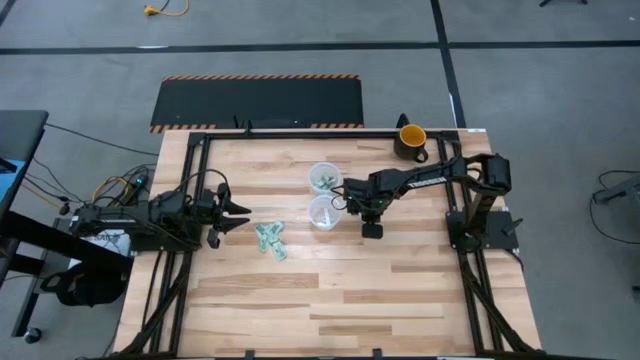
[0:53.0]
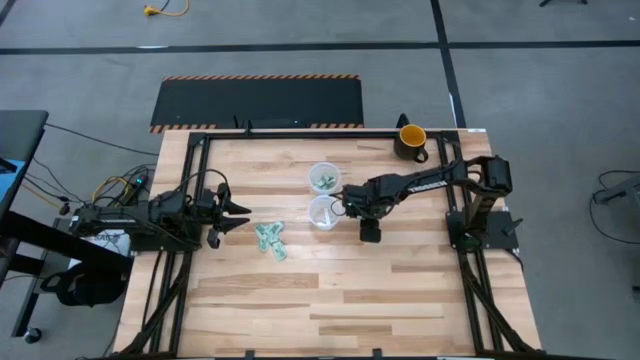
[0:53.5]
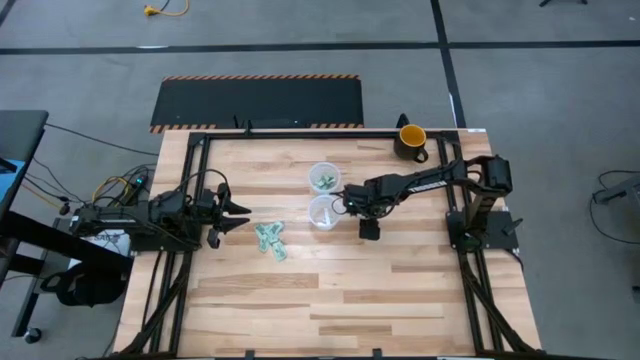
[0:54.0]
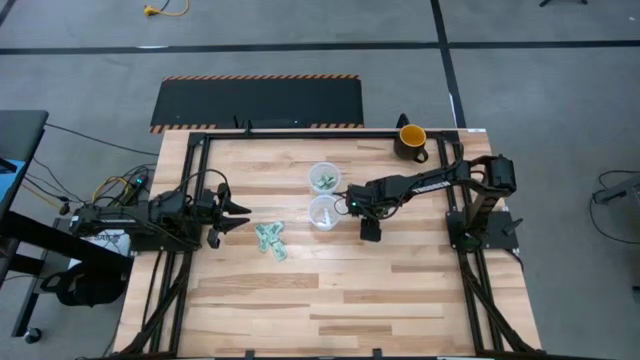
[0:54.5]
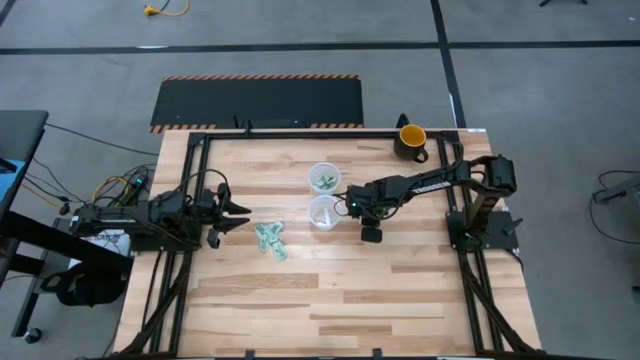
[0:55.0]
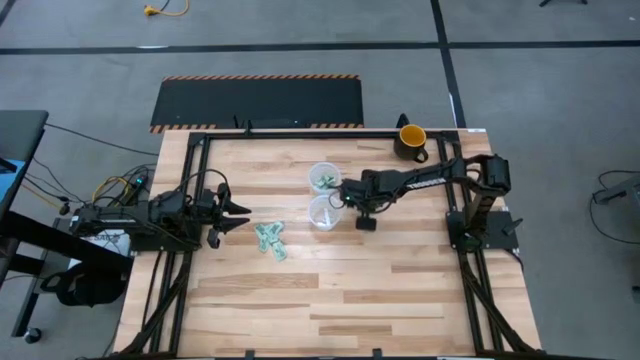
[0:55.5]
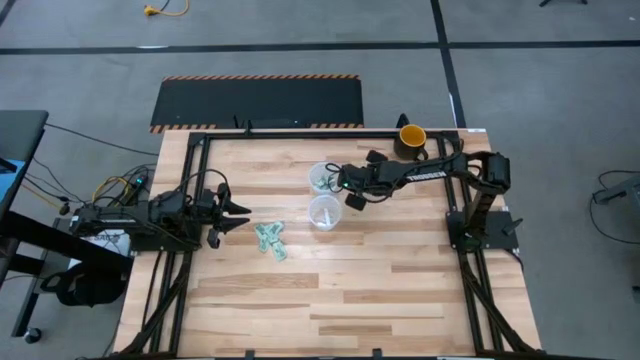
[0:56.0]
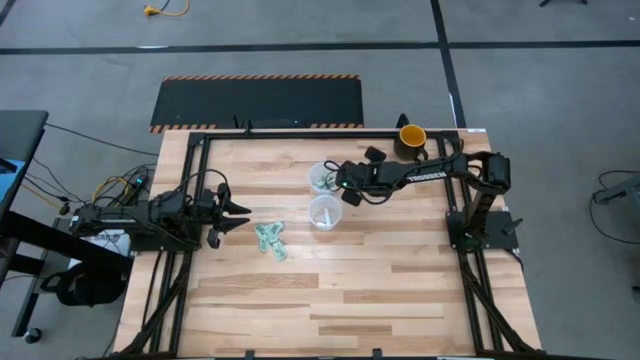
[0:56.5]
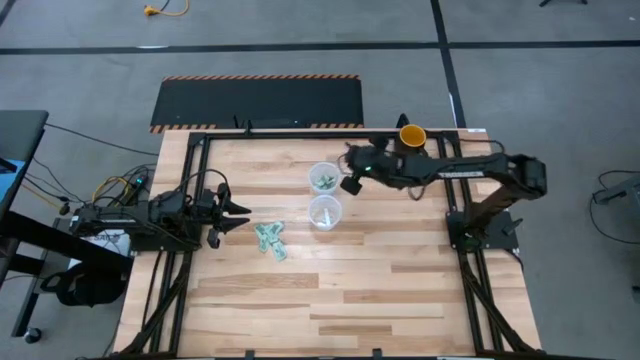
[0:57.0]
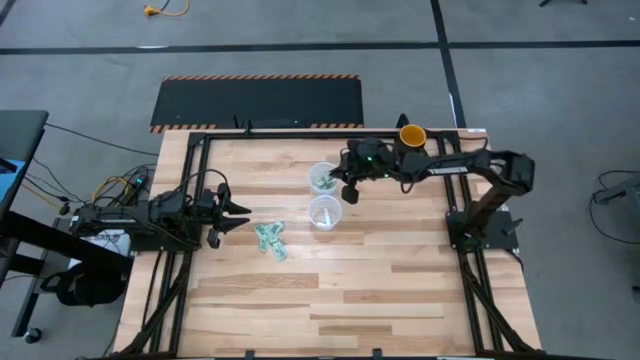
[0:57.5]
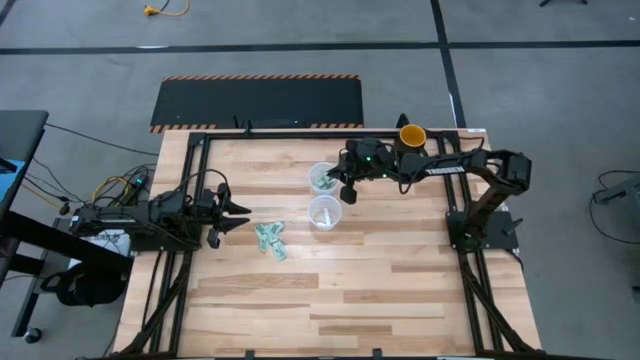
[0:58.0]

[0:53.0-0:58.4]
Task: Pick and place items into bin
Put the green stevia packet into the top transparent bin

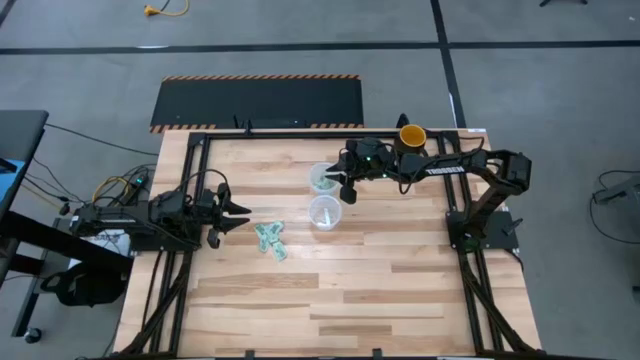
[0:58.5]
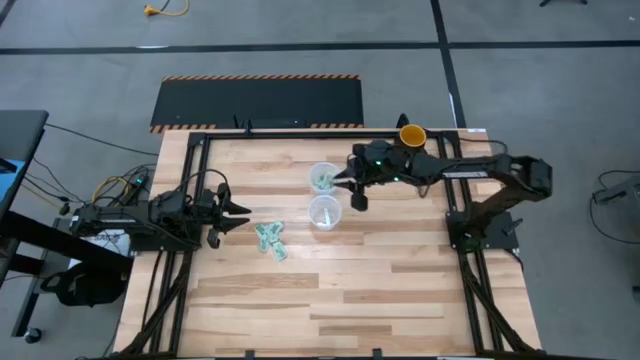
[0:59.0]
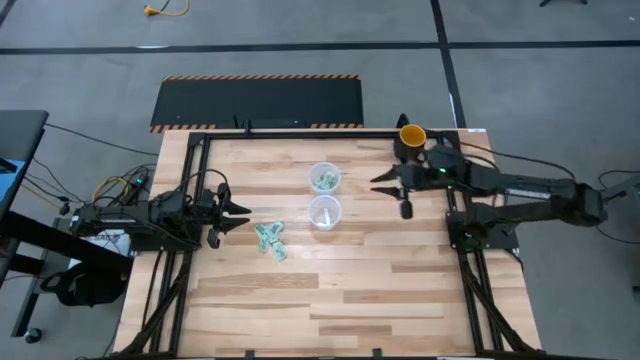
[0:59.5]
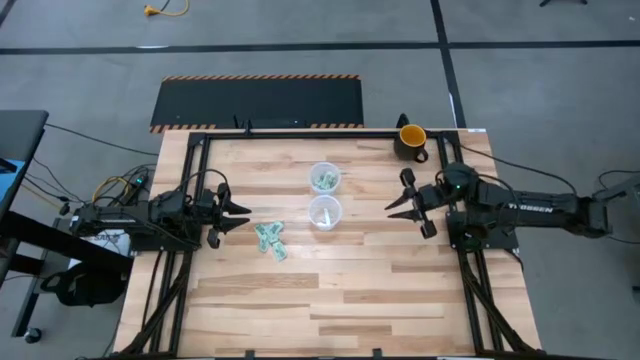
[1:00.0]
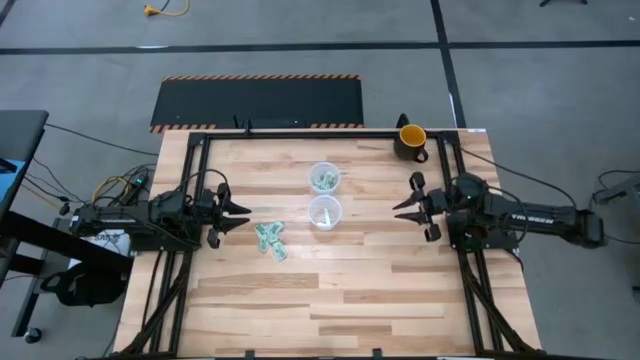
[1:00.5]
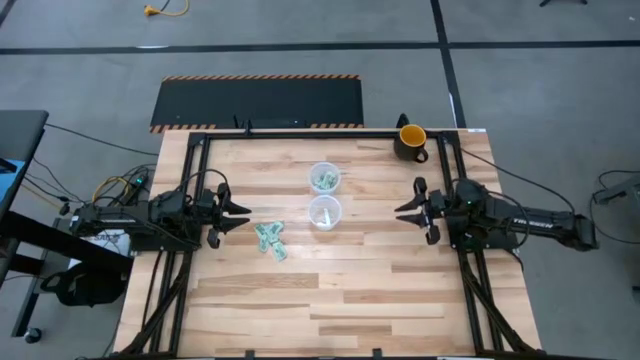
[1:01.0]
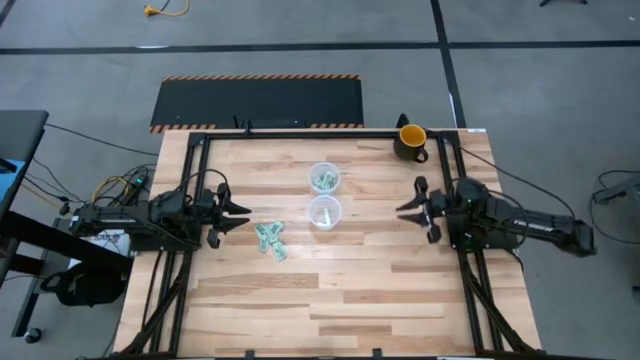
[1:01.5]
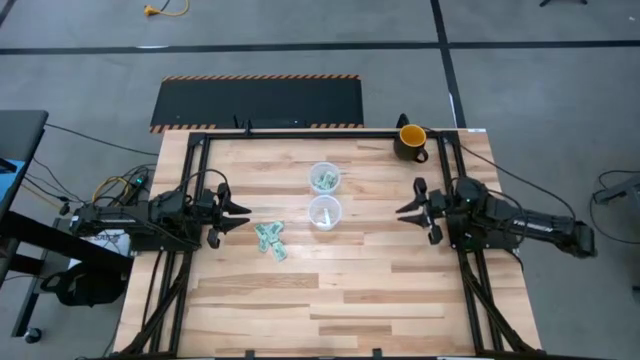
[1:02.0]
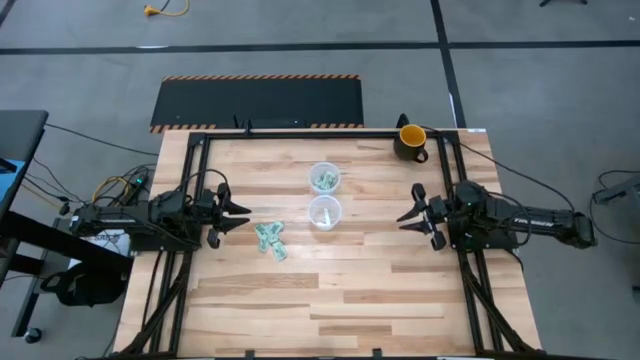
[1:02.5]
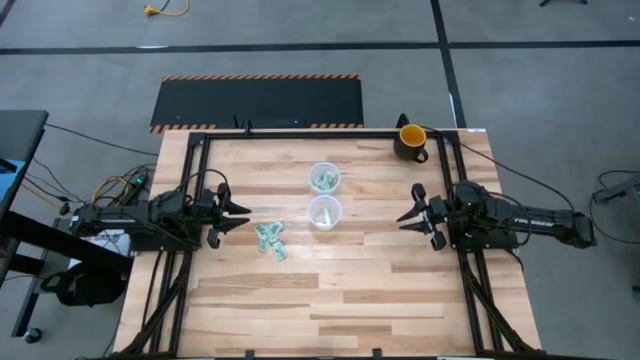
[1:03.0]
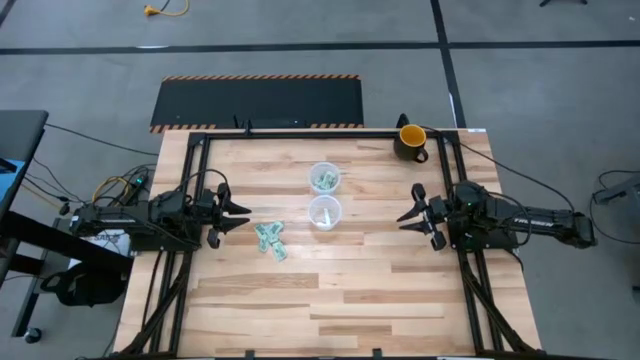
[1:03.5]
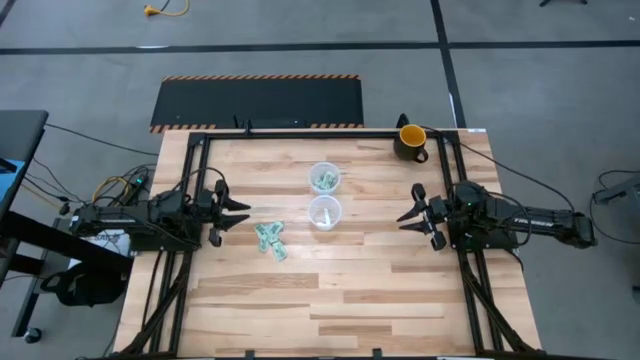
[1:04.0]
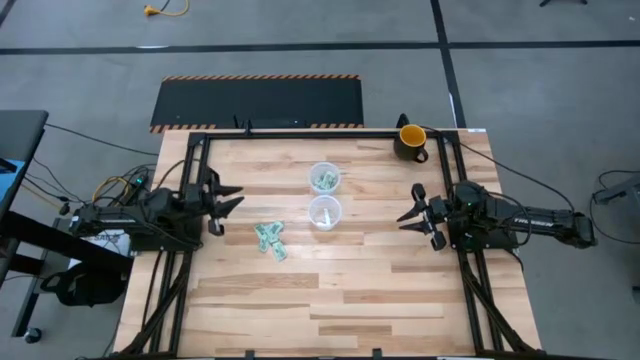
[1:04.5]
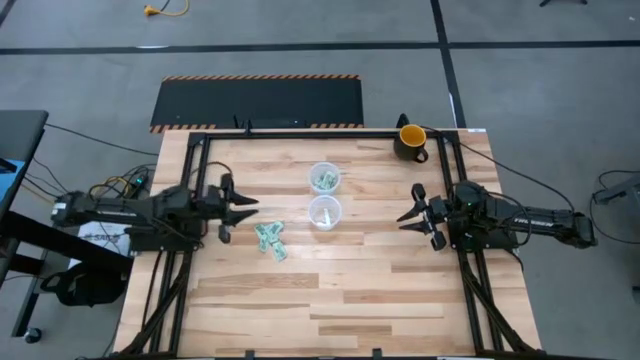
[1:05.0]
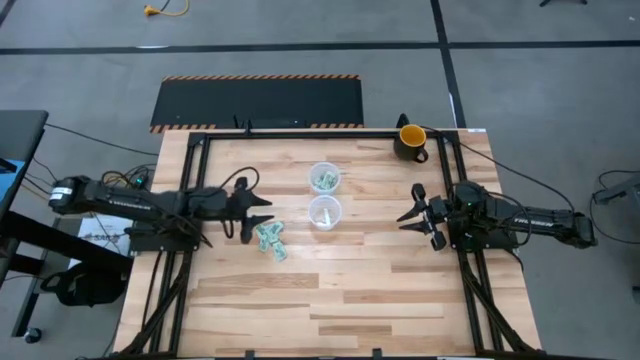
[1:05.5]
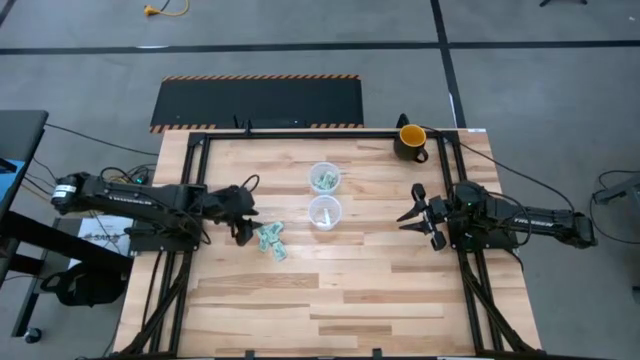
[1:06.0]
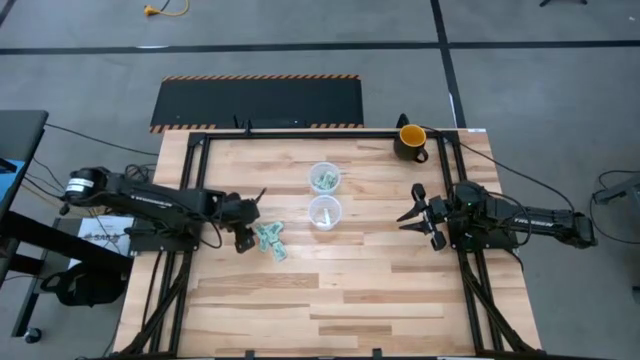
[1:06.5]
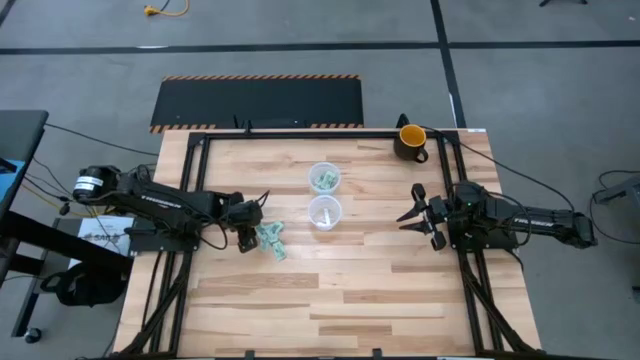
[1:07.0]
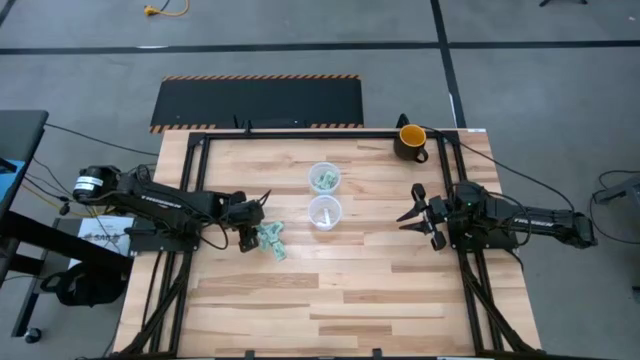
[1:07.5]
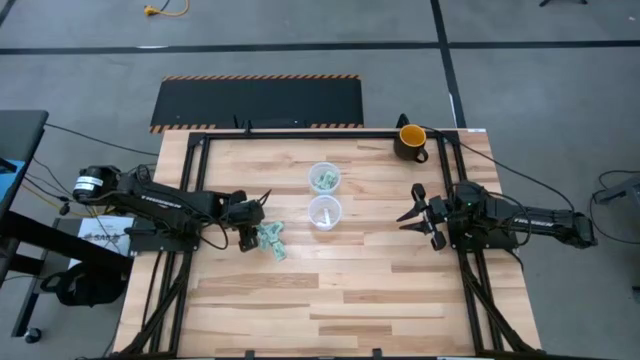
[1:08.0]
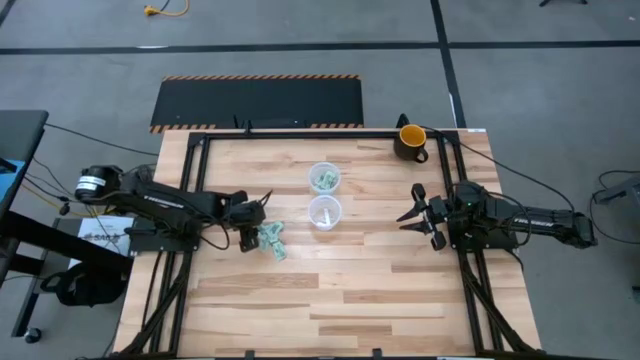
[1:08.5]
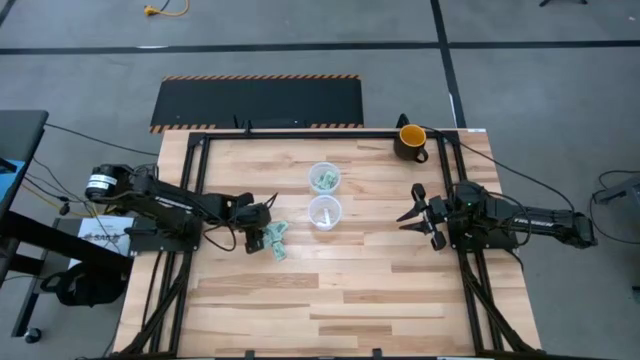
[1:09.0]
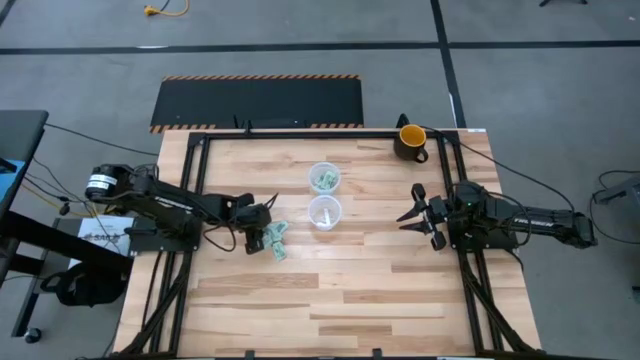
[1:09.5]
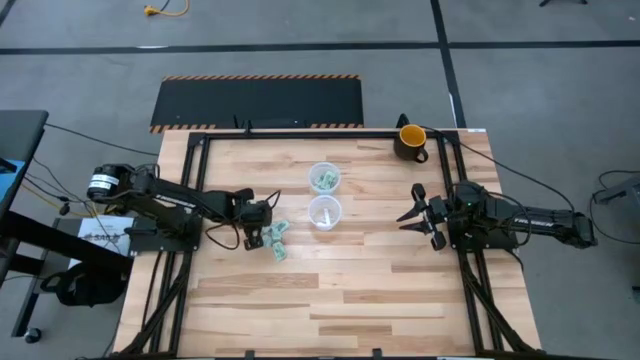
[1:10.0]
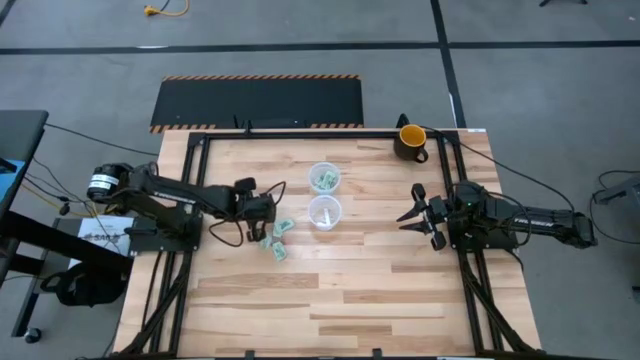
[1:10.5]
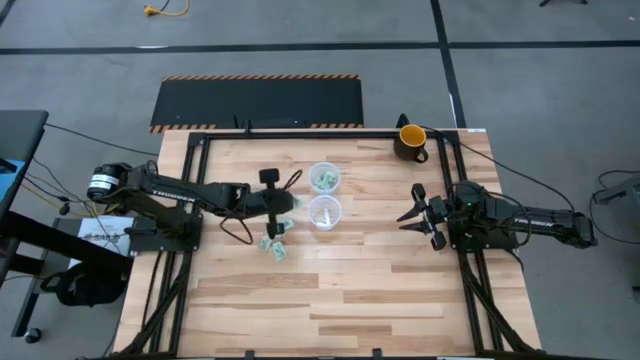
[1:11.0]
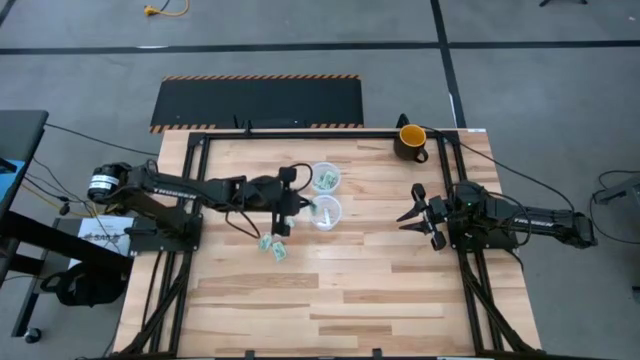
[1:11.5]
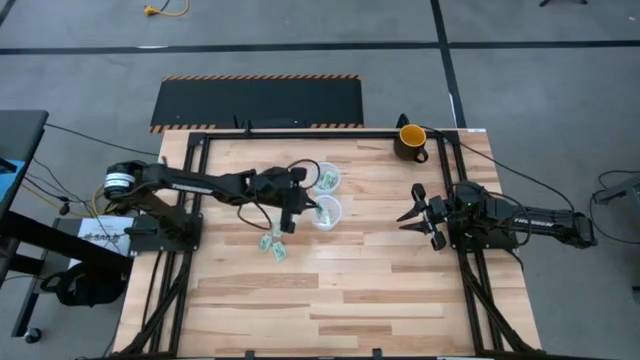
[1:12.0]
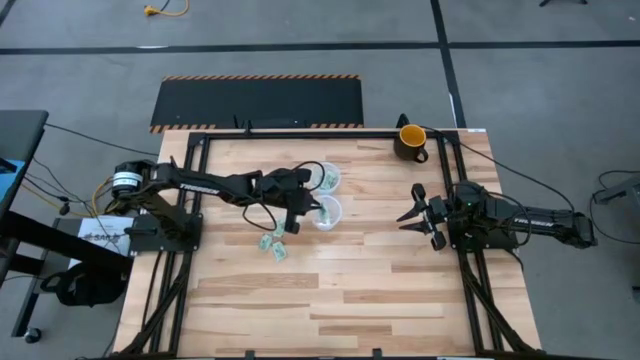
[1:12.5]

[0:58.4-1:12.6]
Put the green stevia packet into the bottom transparent bin

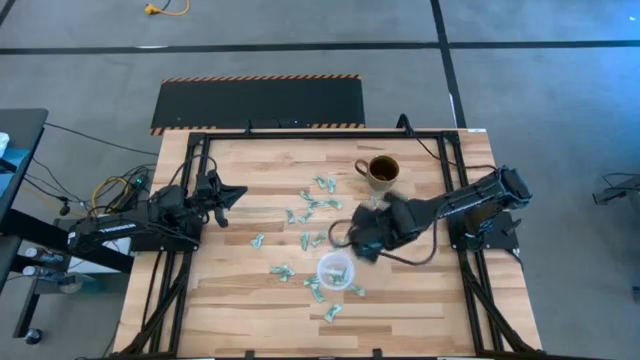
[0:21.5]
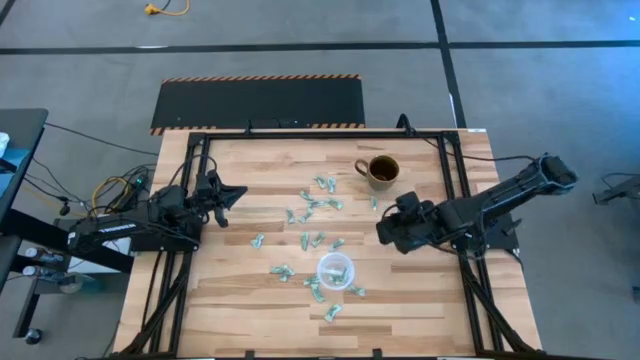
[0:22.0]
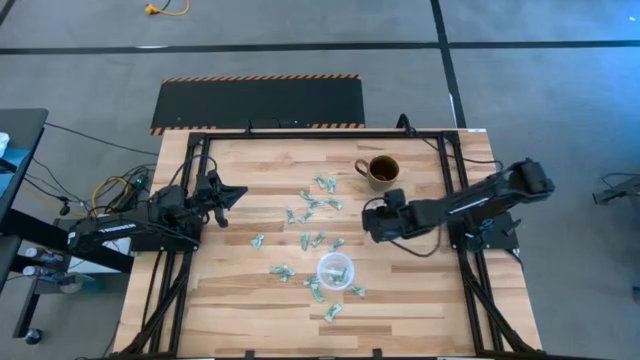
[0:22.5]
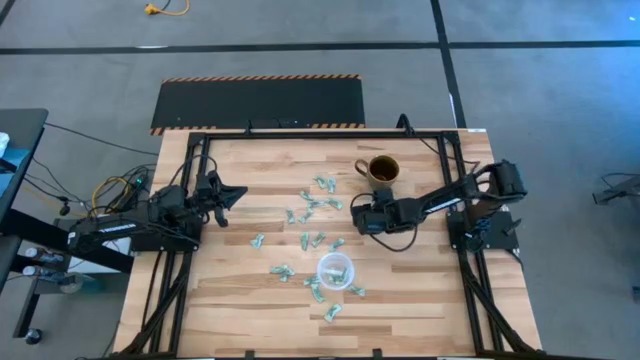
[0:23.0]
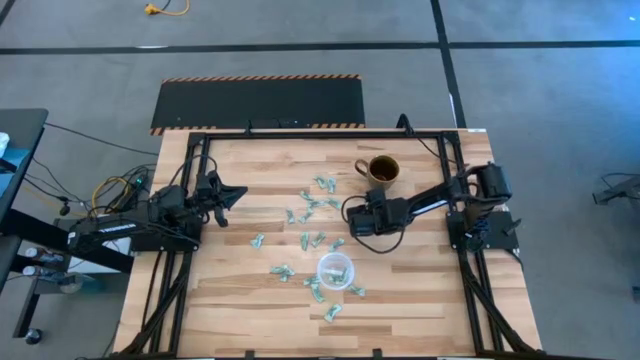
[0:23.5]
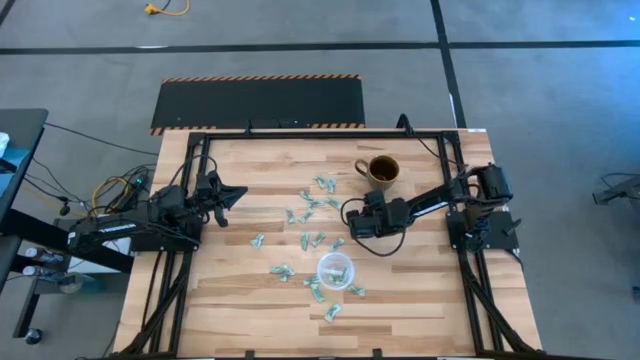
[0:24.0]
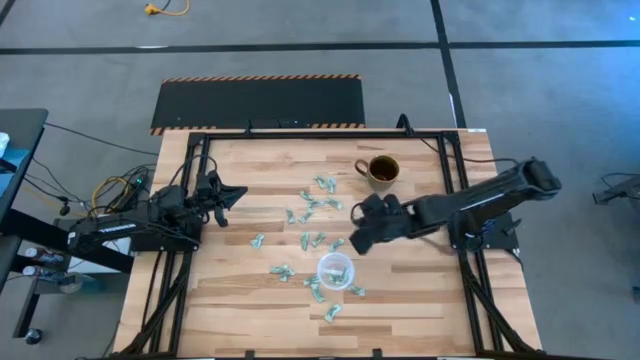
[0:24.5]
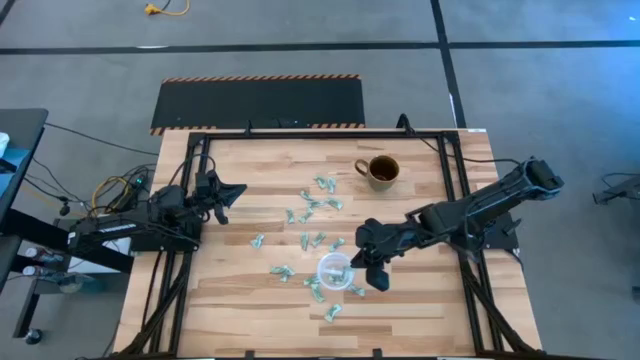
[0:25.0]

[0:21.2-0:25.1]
Task: Pick and place Stevia / Truvia into bins
Put the green stevia packet into the transparent container
